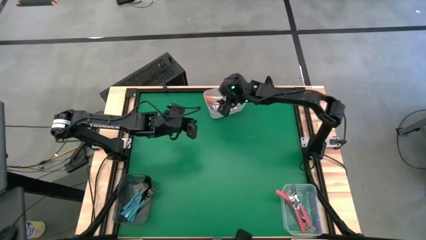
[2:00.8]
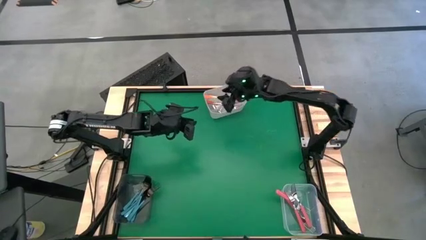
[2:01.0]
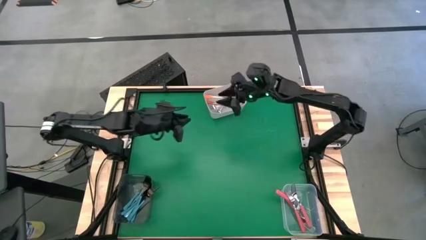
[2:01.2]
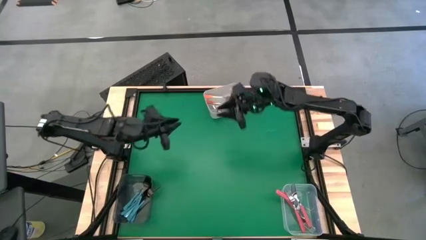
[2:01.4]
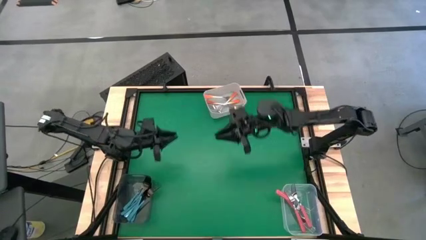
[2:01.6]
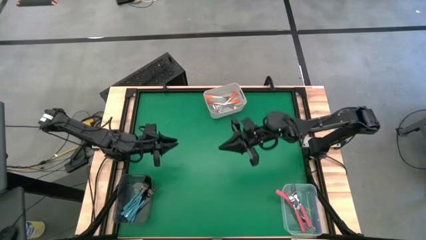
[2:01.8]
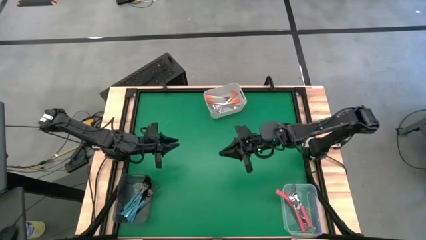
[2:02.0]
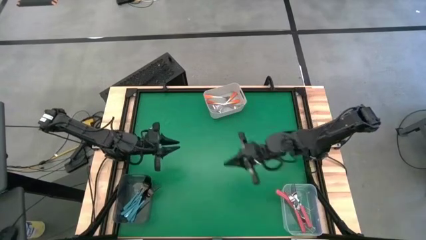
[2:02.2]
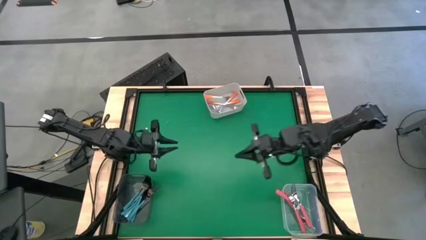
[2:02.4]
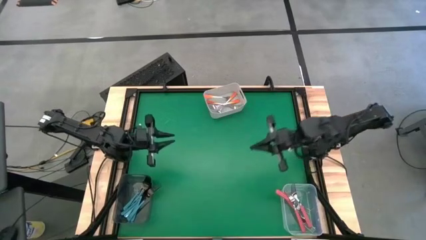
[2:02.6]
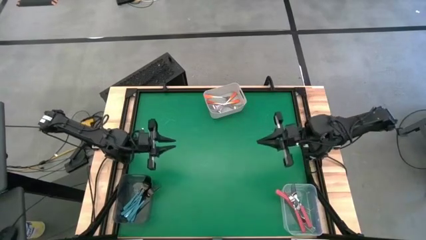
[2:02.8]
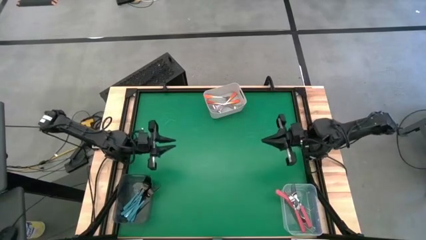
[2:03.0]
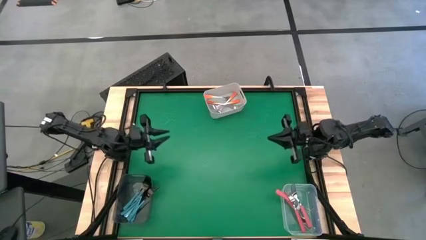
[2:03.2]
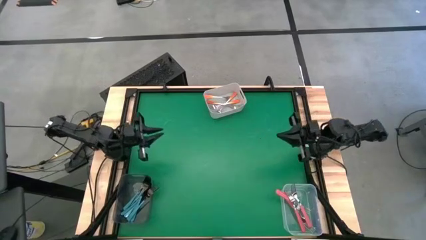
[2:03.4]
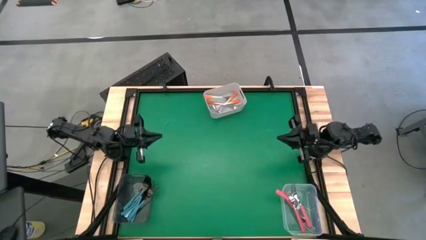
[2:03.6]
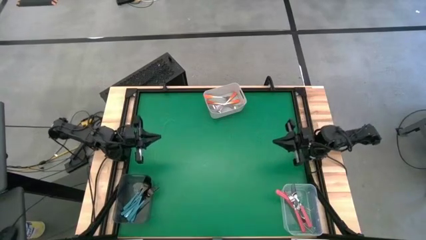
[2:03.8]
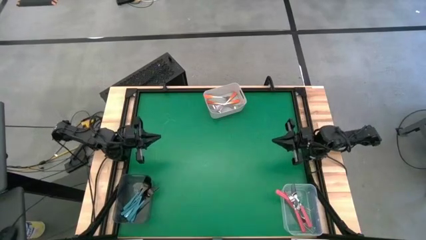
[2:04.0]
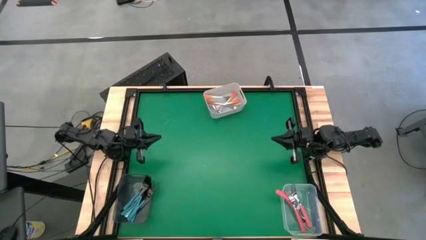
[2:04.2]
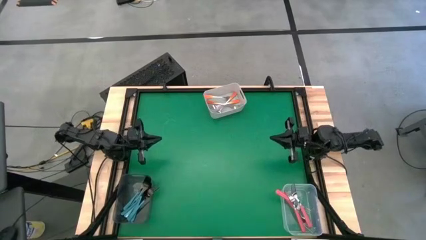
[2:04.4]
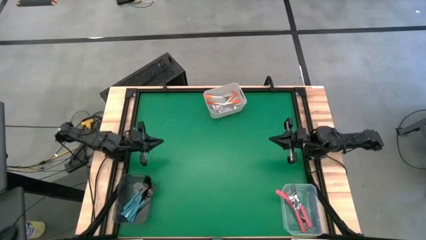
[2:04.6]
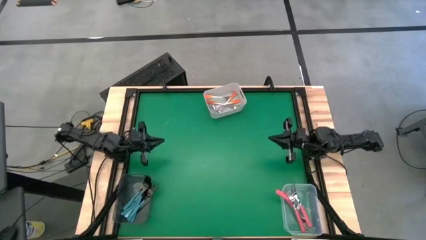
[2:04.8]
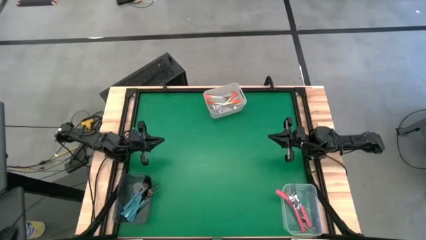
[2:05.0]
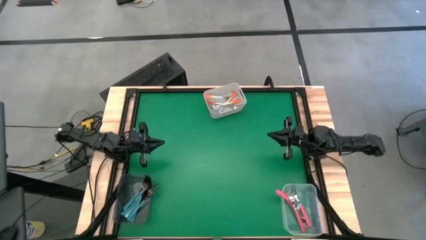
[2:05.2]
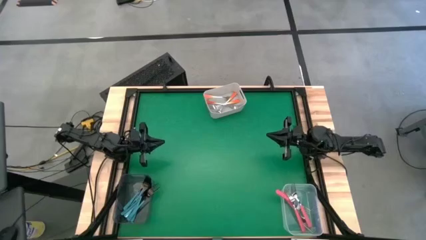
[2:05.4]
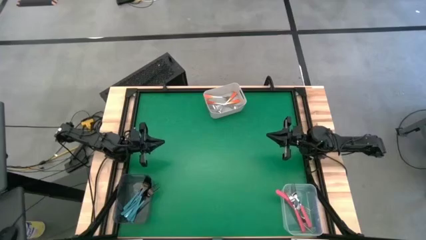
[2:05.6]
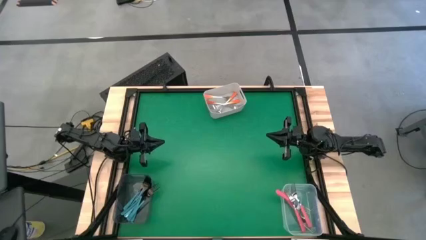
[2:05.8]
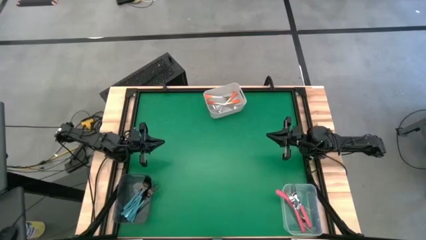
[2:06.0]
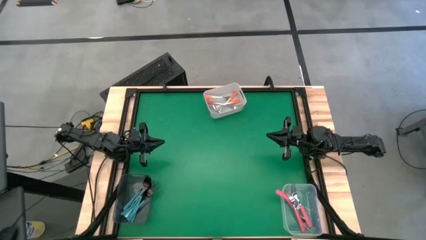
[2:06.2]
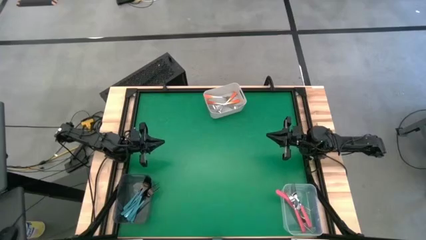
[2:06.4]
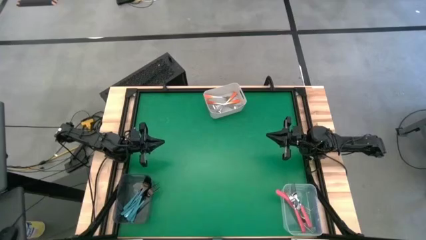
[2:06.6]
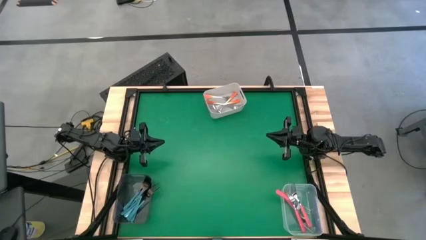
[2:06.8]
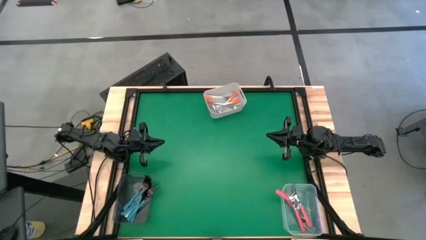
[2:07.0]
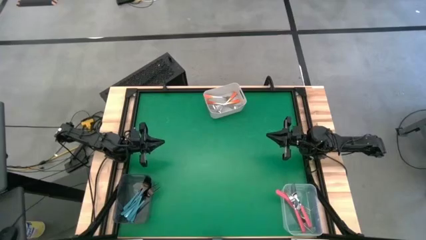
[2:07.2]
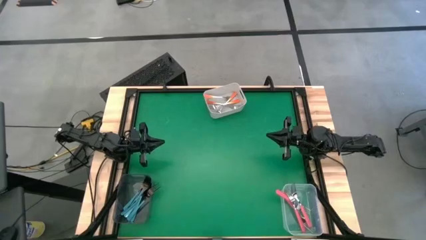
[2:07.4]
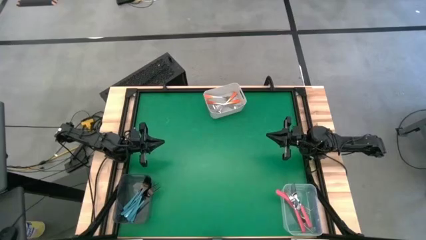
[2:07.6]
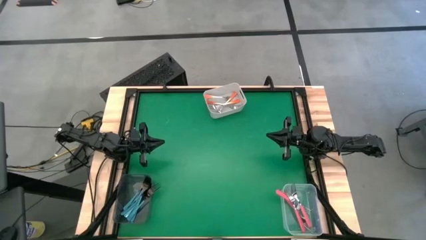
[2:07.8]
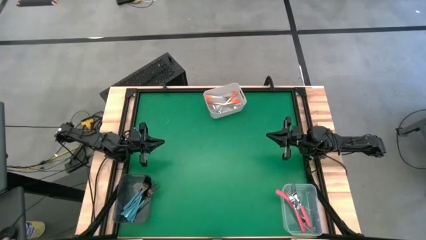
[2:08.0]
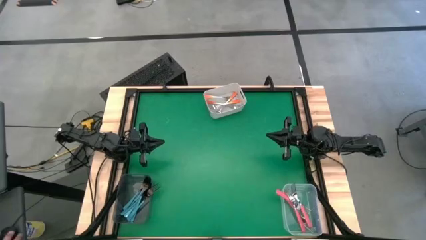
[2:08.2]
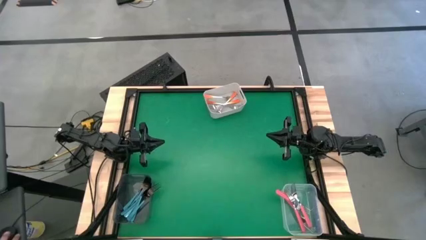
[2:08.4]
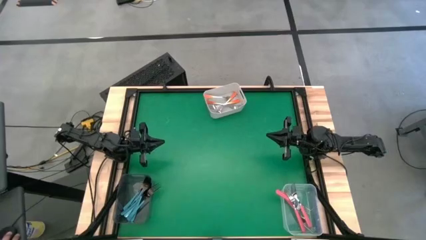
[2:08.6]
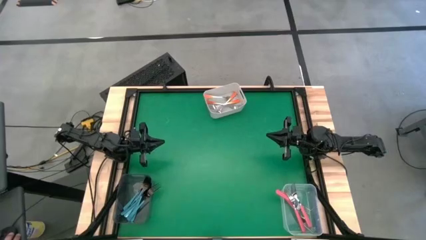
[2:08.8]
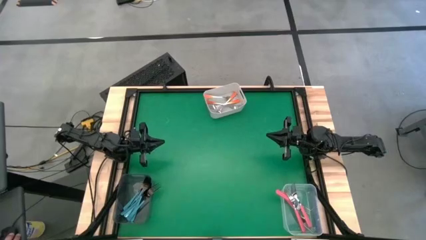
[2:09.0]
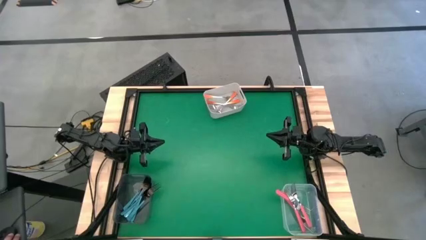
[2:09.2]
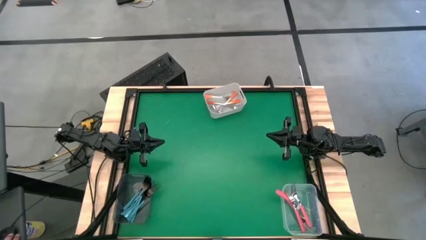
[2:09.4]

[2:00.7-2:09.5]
Task: Sort silverware by color (type)
Return to Home Position

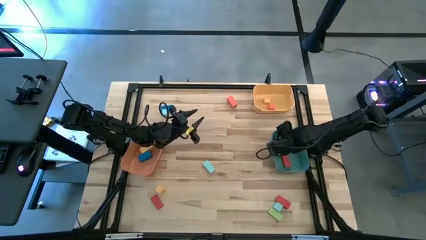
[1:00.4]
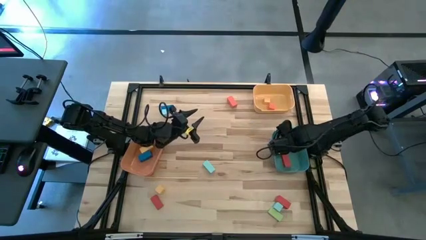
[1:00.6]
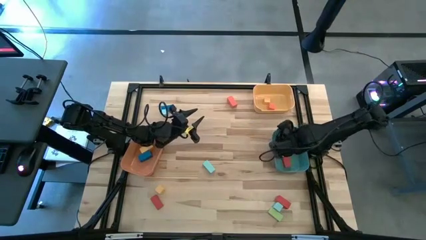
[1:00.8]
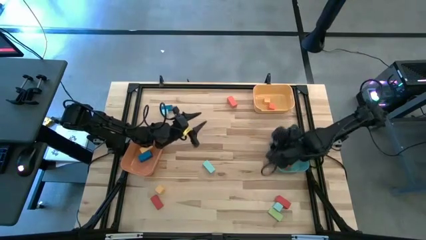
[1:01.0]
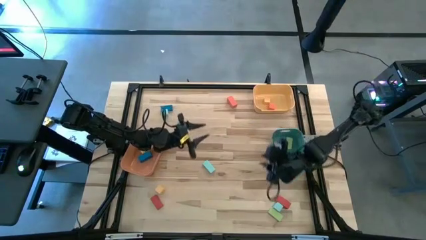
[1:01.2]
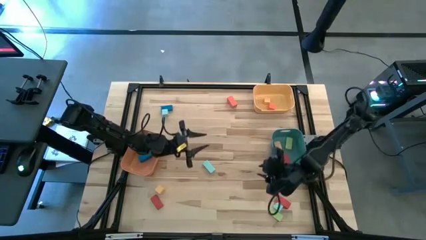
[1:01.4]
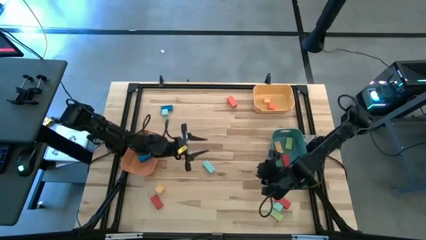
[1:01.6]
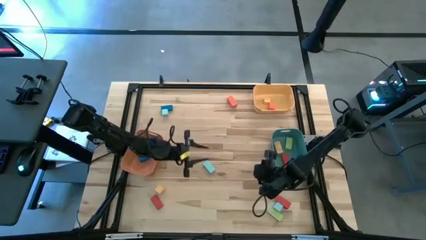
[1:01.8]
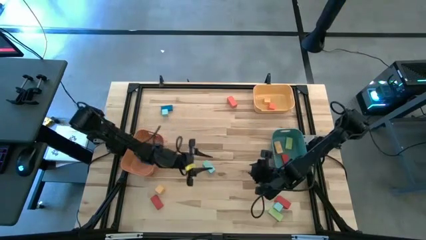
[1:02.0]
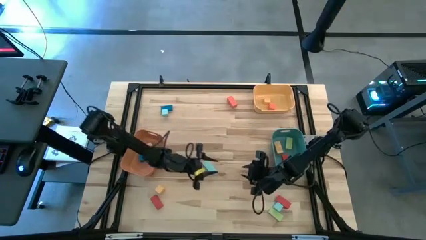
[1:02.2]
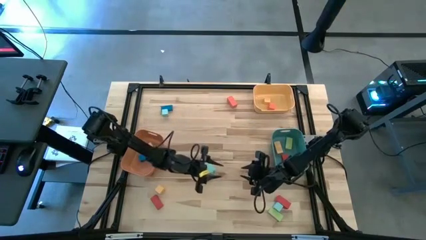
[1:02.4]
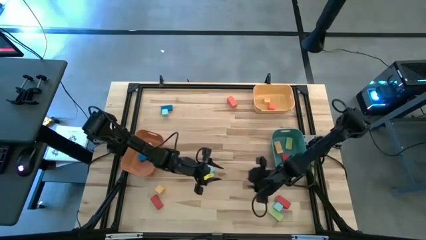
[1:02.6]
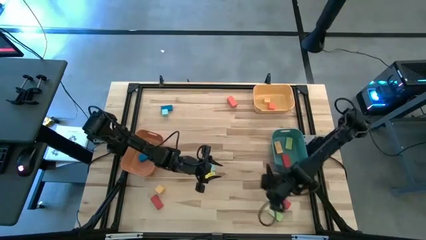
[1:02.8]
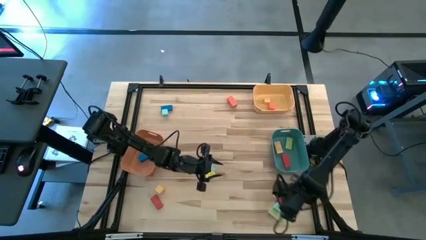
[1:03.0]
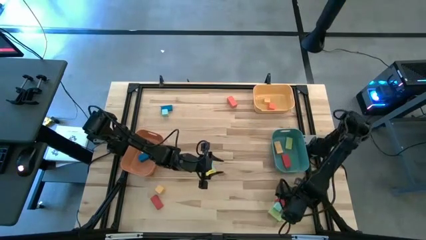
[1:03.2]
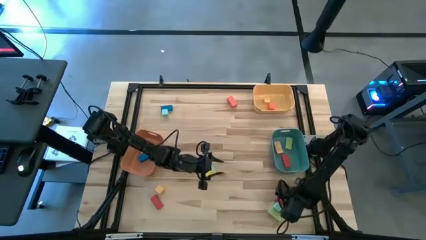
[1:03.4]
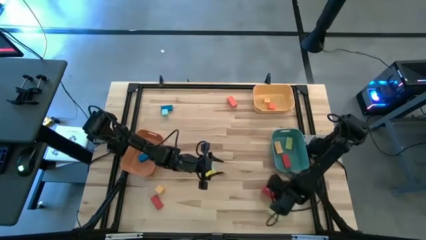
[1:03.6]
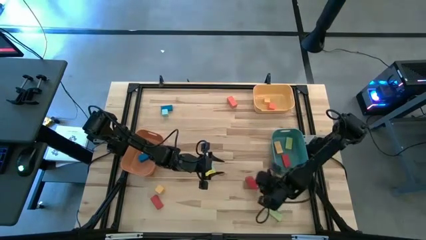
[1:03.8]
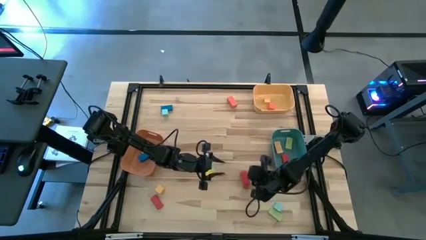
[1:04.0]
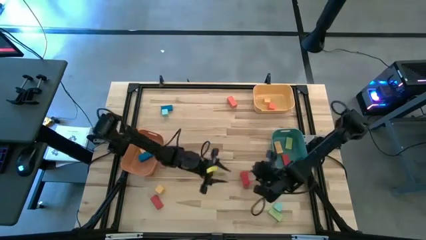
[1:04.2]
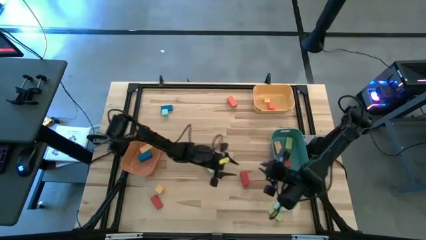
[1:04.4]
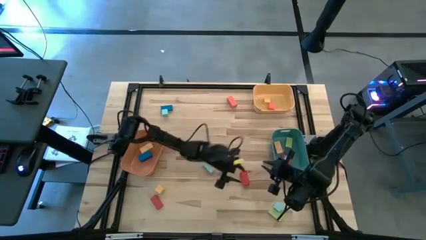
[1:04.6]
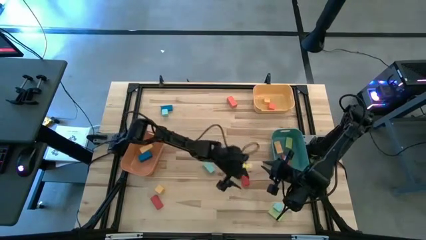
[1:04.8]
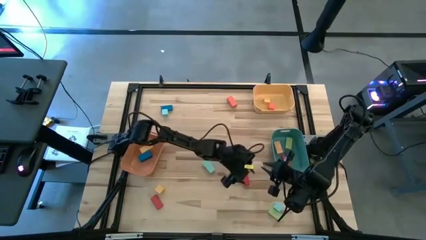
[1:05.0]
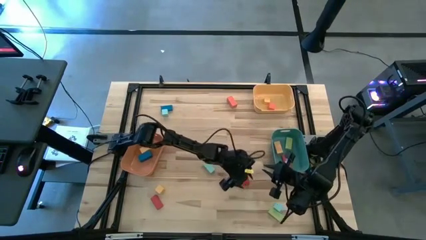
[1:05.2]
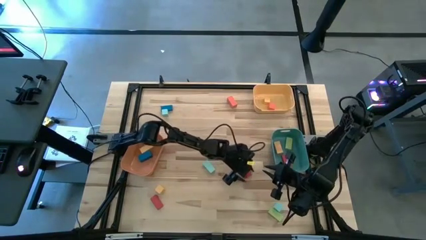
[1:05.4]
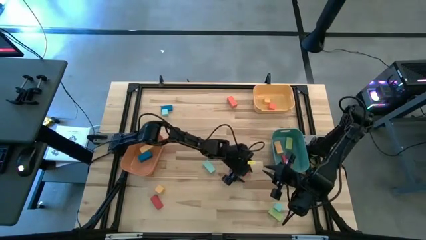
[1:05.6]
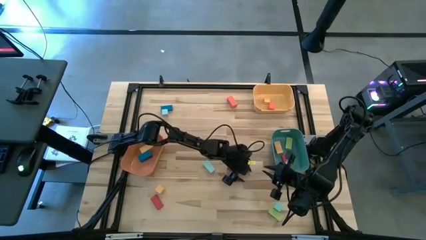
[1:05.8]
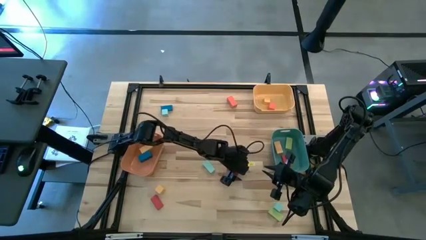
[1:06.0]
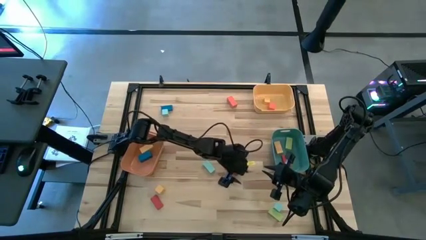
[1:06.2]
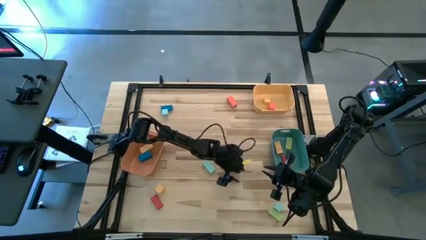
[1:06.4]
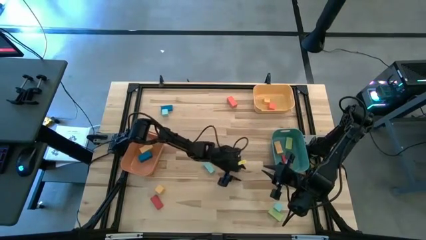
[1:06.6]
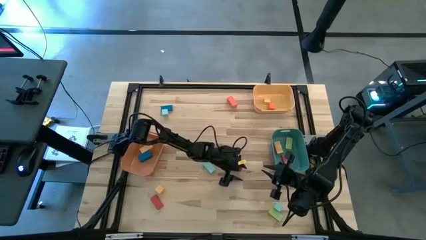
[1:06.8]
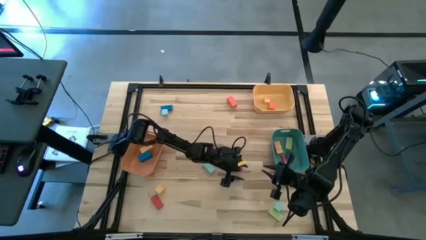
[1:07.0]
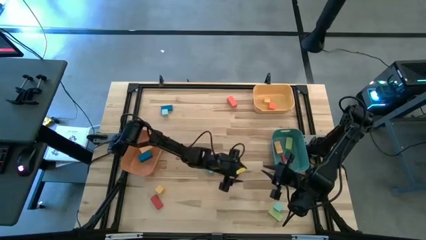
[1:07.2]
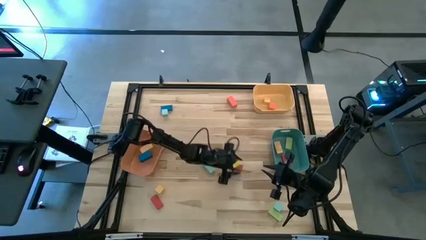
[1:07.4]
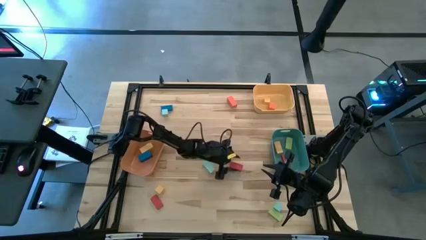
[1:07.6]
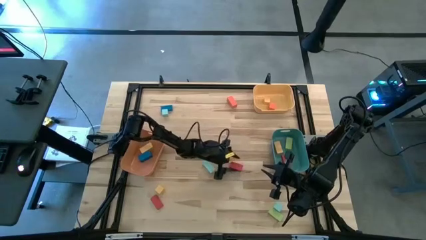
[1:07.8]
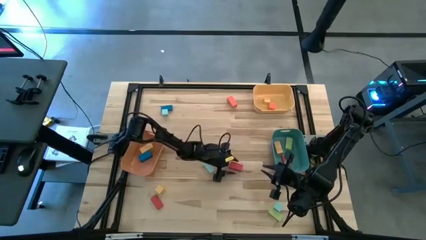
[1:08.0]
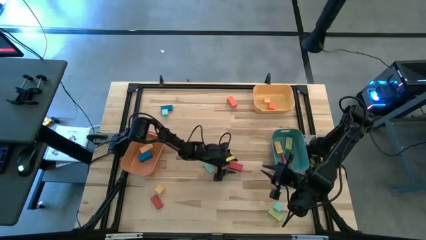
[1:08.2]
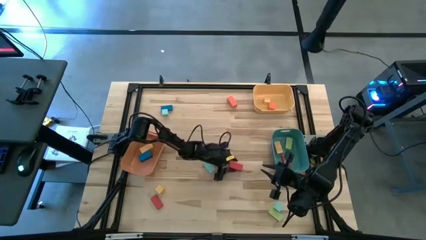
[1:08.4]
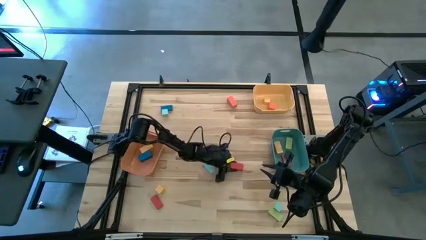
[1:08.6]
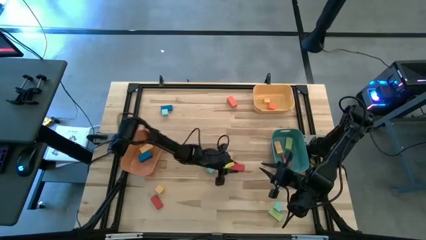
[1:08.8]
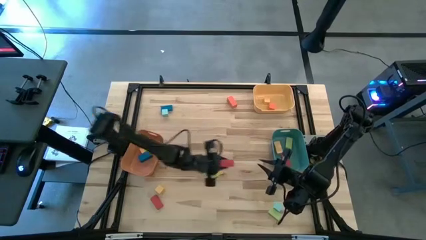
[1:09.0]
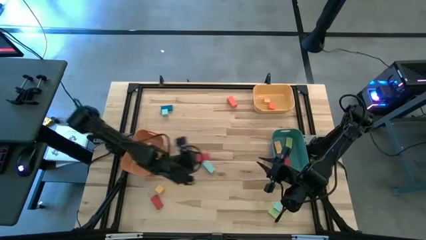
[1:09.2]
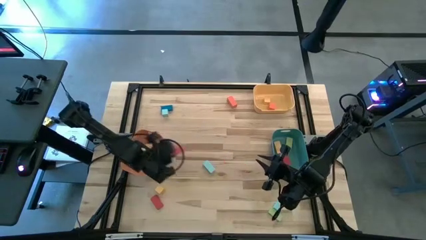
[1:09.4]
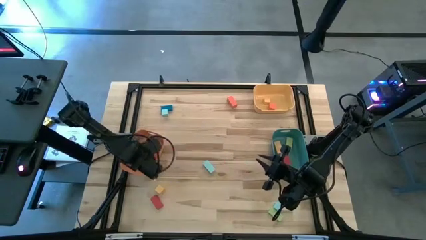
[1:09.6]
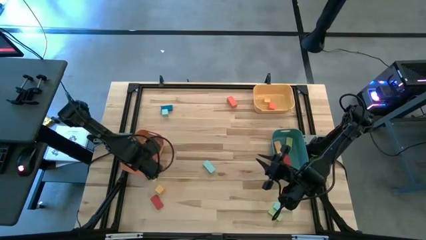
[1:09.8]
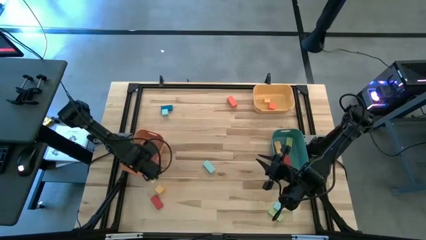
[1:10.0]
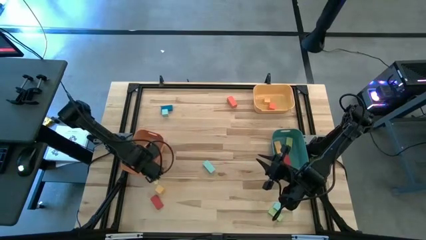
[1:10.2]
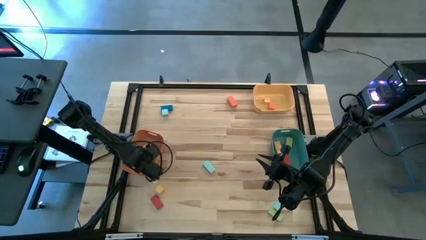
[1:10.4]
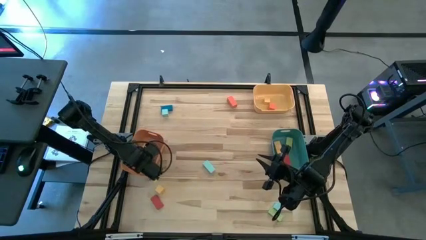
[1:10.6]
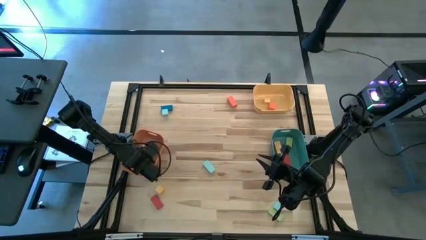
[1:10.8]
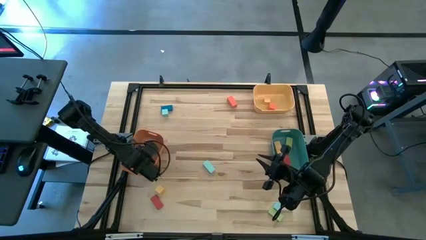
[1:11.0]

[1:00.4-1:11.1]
Task: Sort blocks by size
Put the thick red rectangular block into the orange bin
